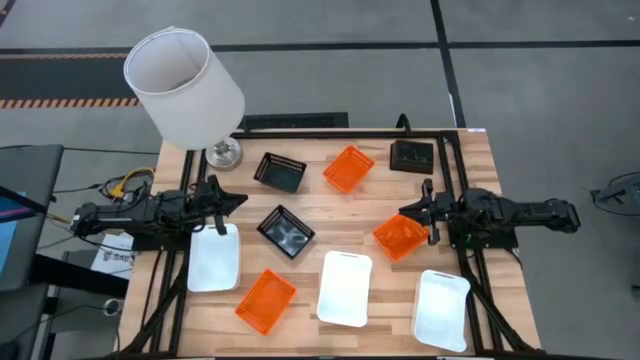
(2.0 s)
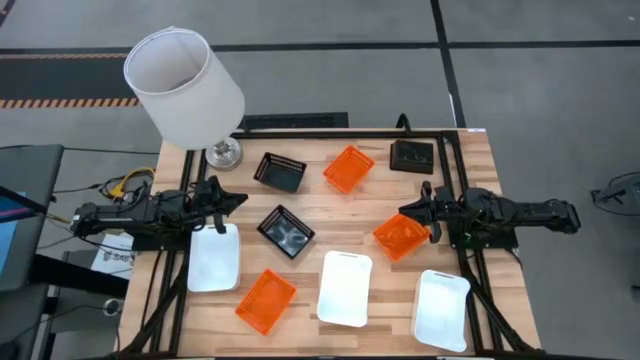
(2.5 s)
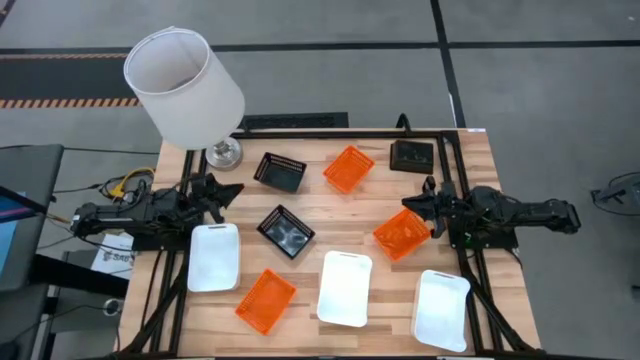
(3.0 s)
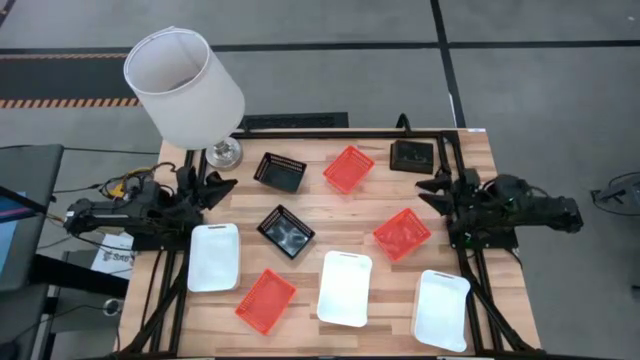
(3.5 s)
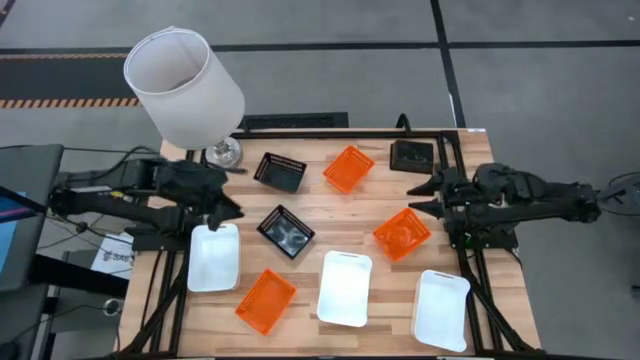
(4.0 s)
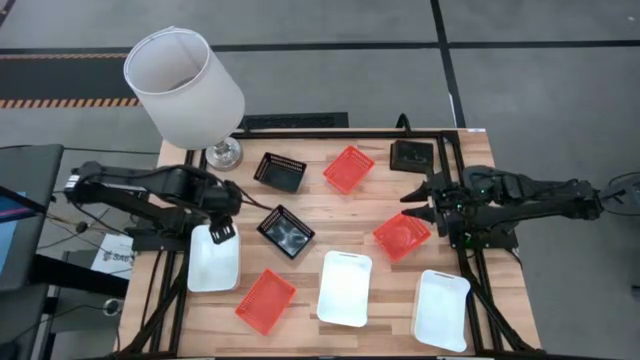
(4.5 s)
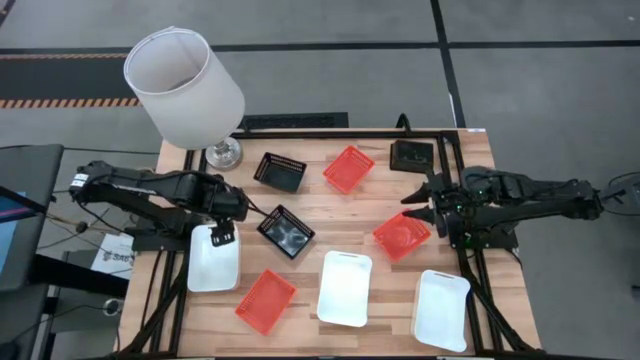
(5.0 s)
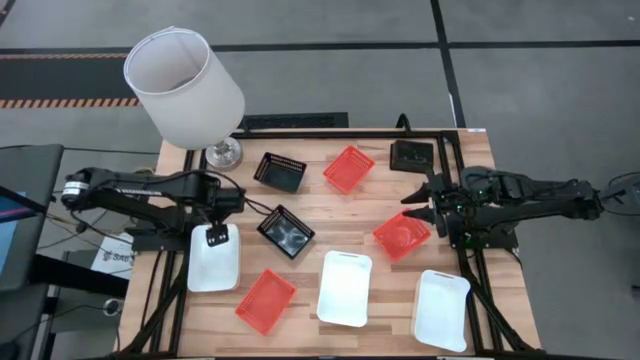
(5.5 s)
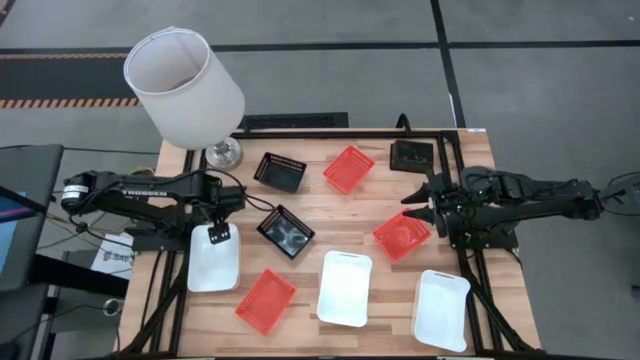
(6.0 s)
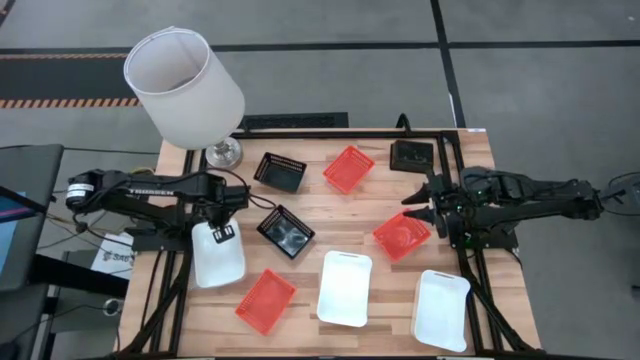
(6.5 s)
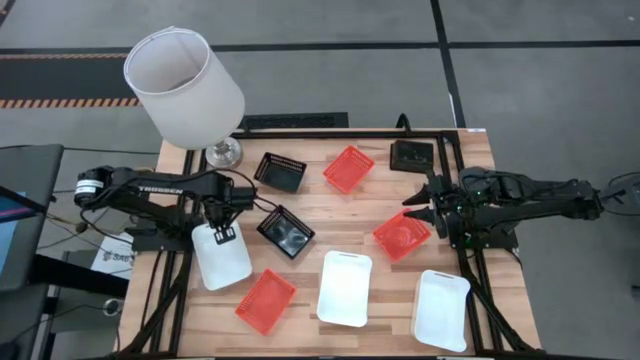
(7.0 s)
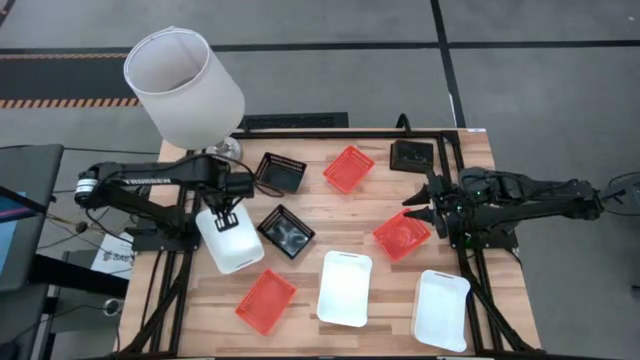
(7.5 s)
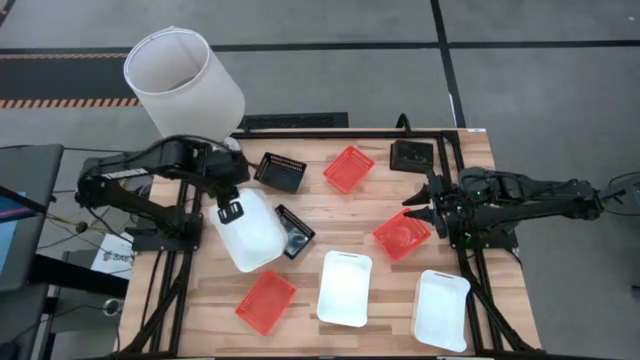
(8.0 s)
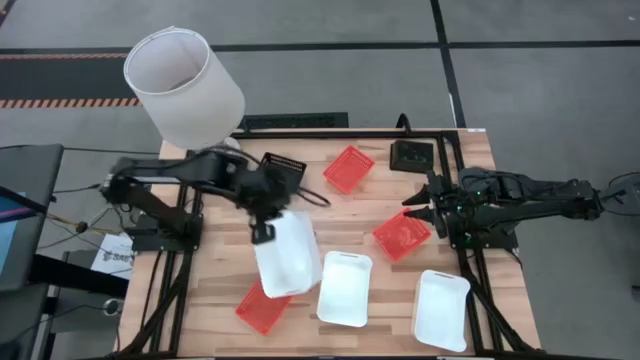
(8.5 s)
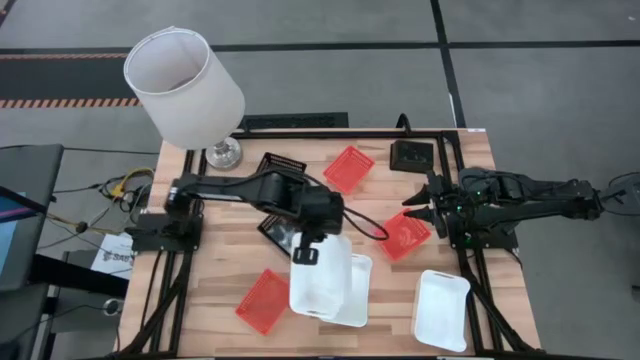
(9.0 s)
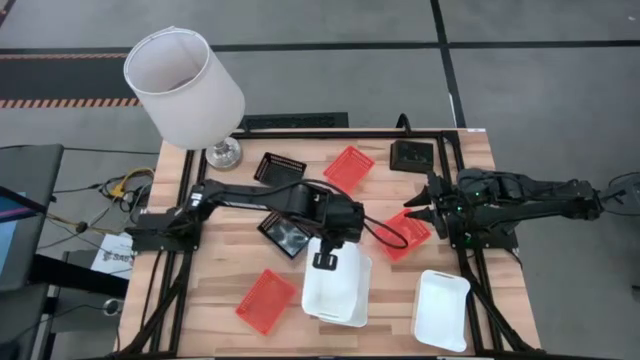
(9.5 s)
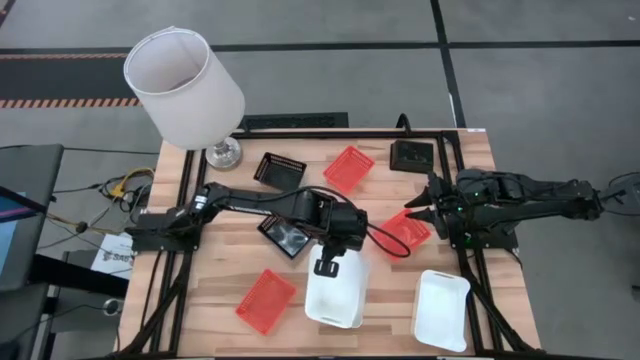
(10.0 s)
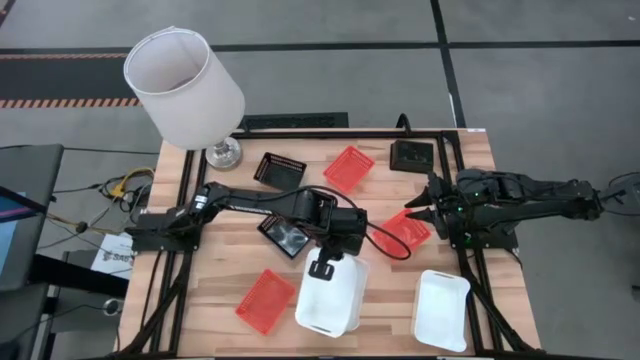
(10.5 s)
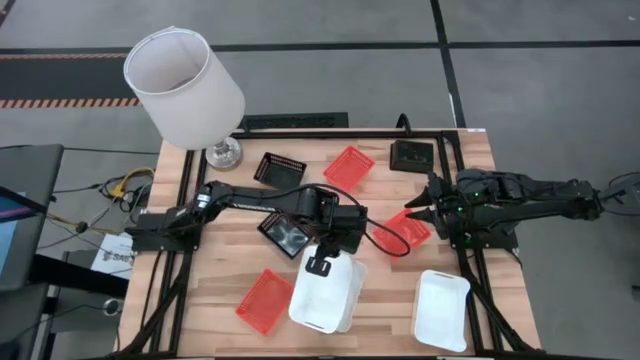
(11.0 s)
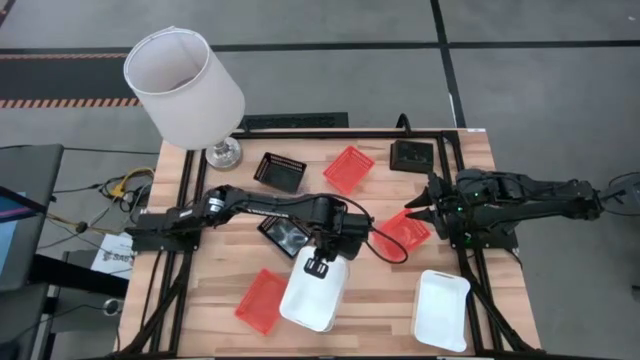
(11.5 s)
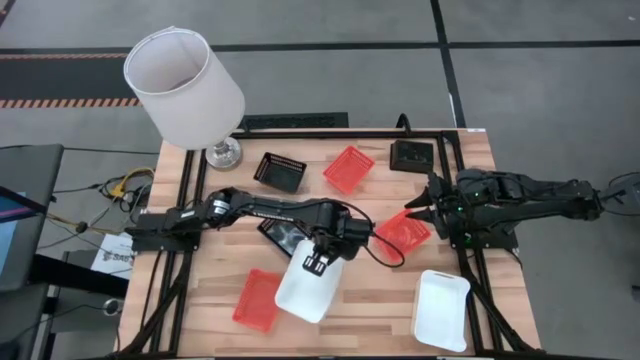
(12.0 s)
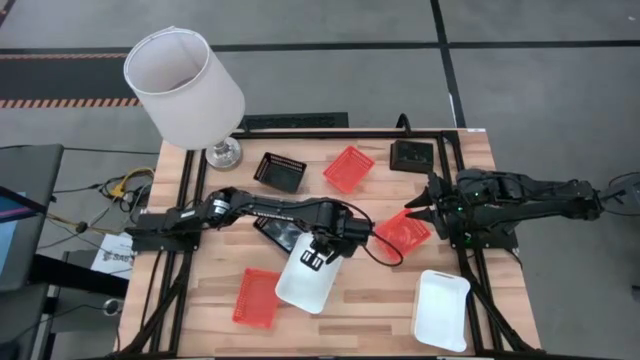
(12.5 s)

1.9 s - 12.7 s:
Stack the left white bin on the left white bin

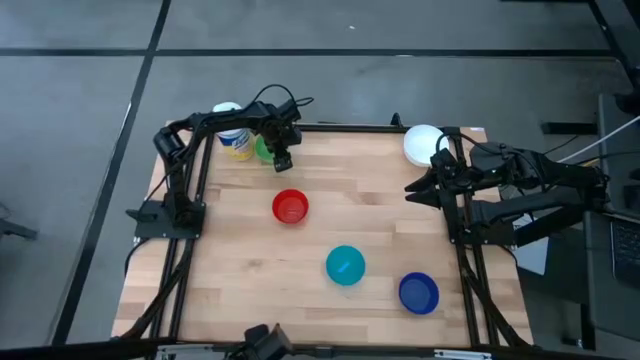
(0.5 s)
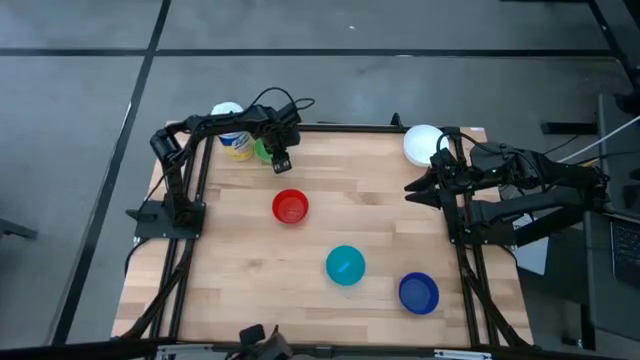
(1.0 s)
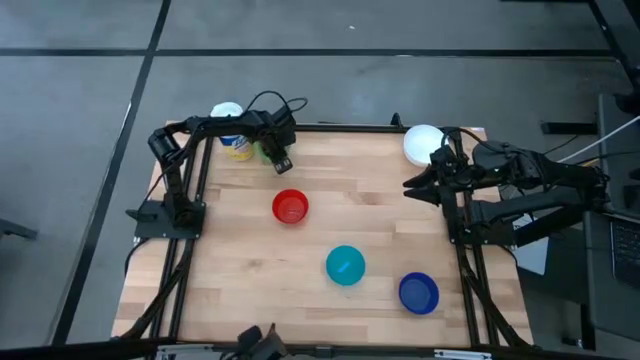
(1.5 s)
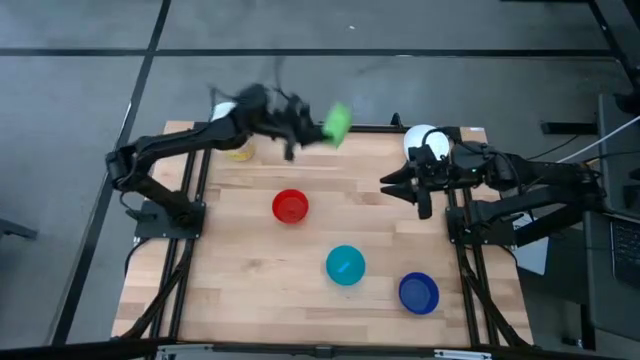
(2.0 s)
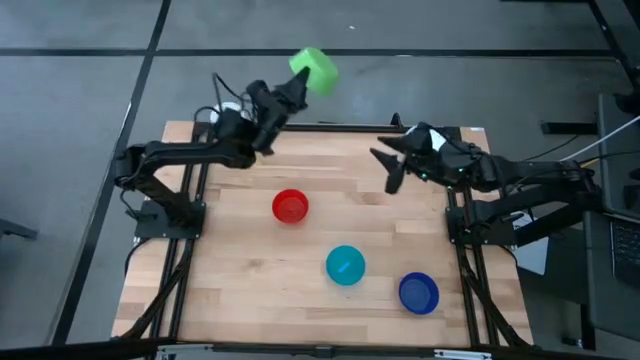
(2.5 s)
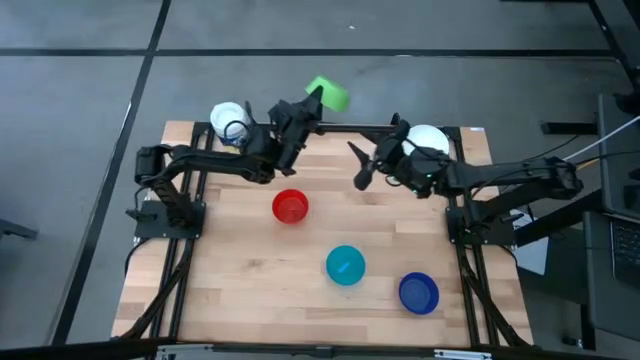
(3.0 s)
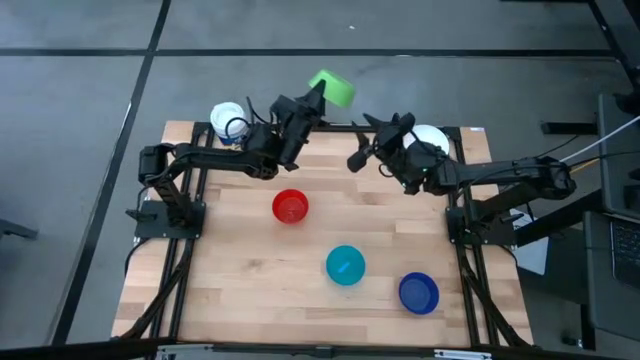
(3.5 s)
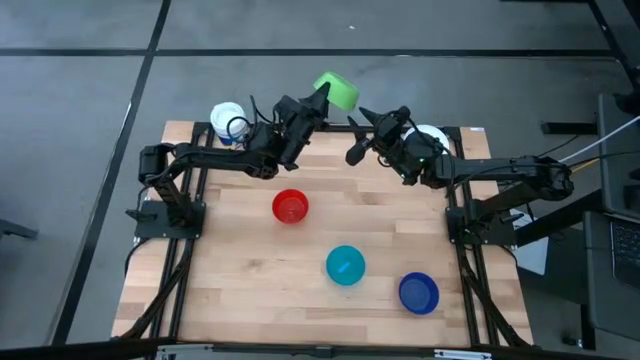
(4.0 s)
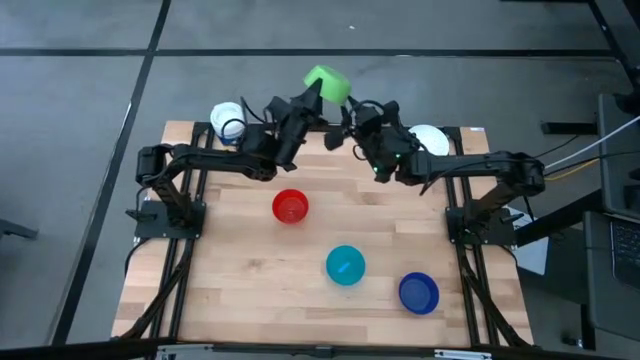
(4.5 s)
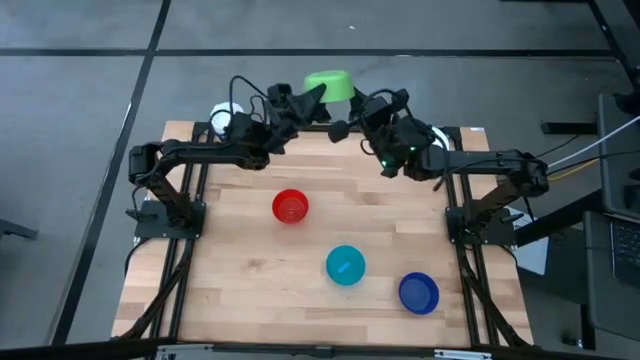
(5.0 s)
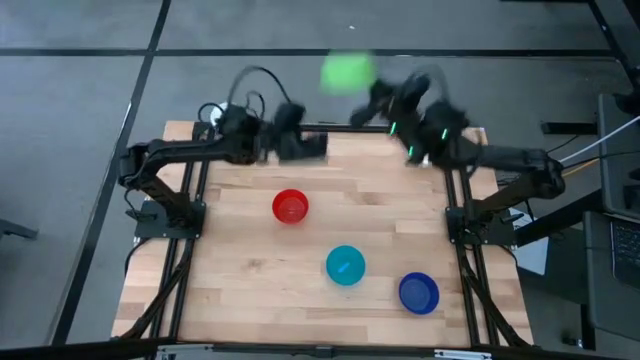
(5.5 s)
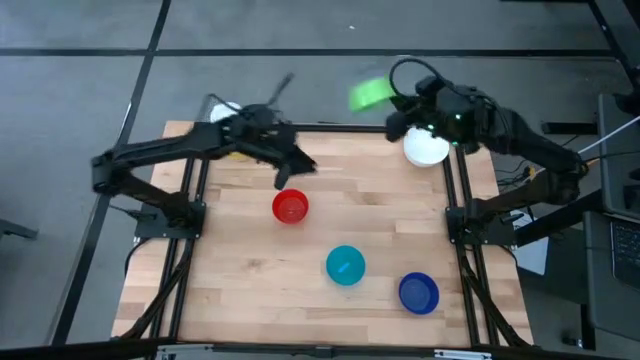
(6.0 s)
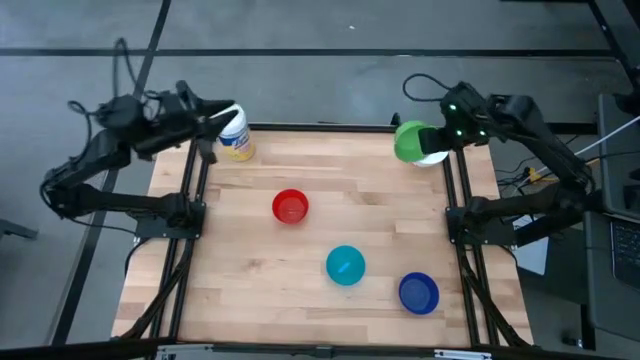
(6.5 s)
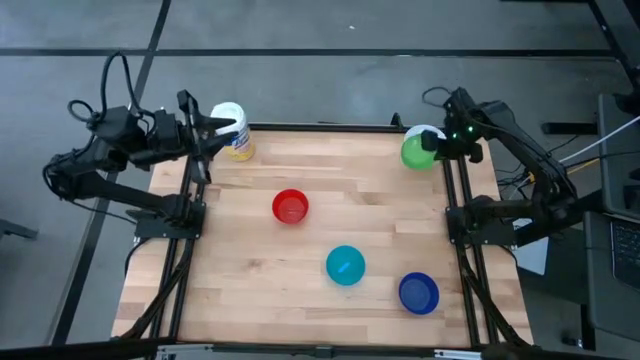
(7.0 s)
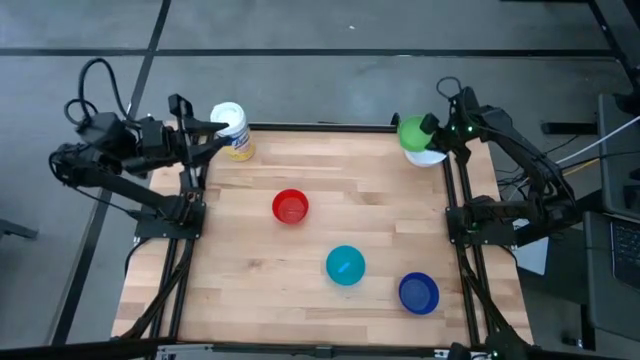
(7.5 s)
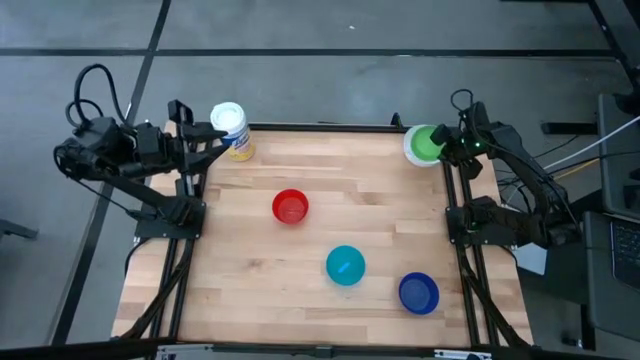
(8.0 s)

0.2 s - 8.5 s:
Stack the green bowl on top of the white bowl
